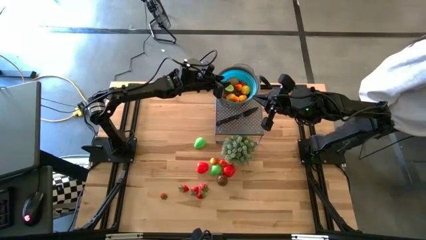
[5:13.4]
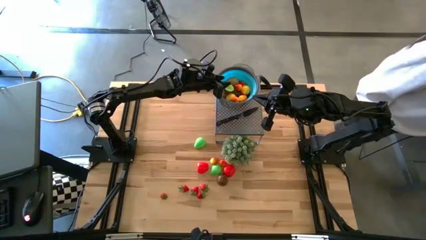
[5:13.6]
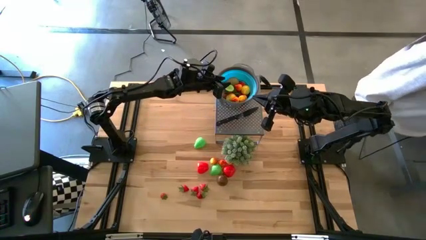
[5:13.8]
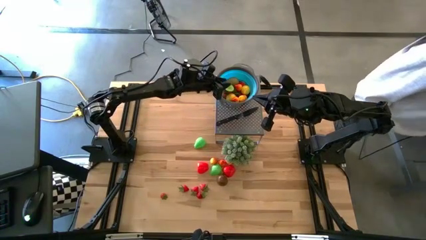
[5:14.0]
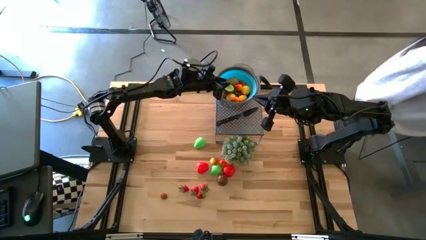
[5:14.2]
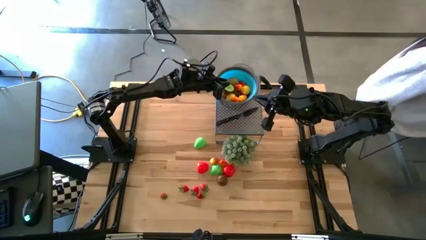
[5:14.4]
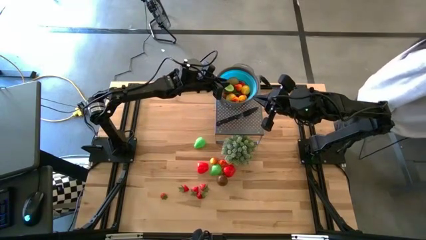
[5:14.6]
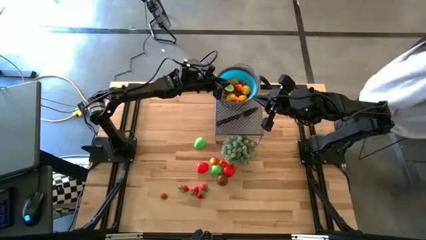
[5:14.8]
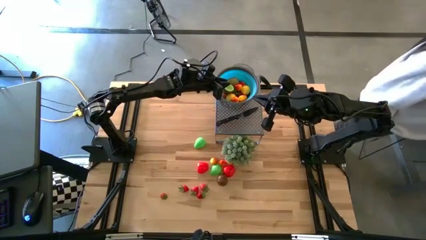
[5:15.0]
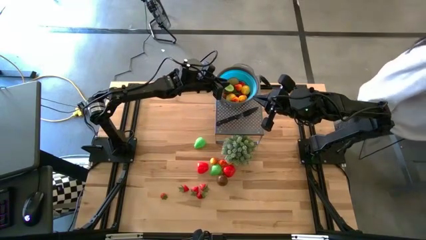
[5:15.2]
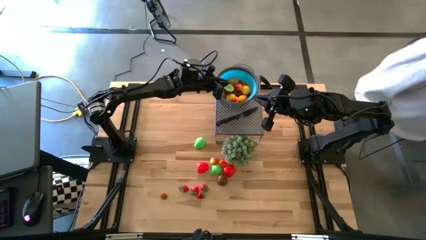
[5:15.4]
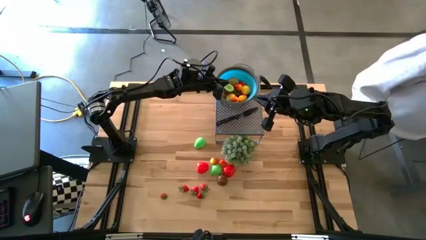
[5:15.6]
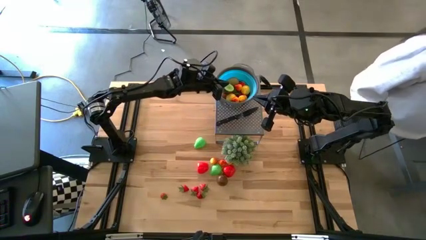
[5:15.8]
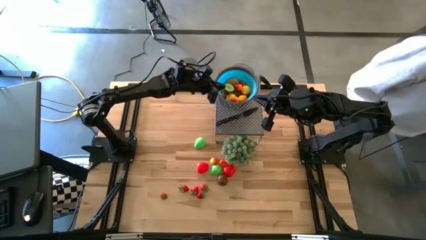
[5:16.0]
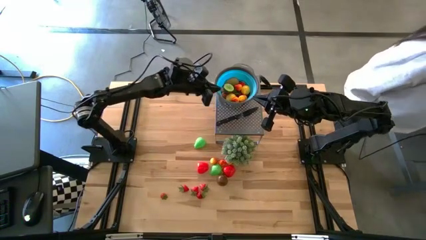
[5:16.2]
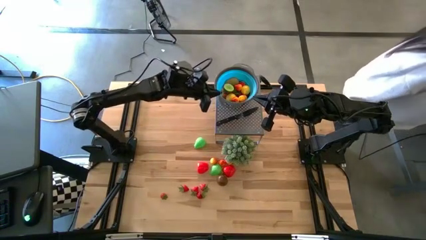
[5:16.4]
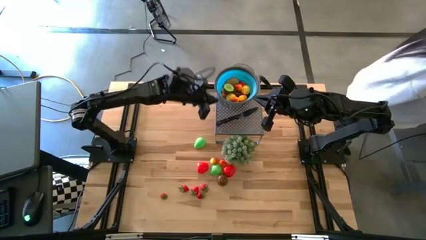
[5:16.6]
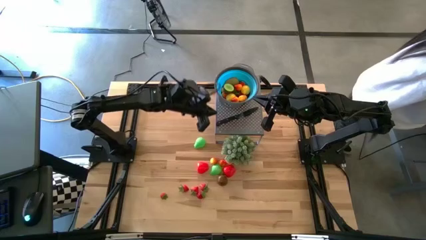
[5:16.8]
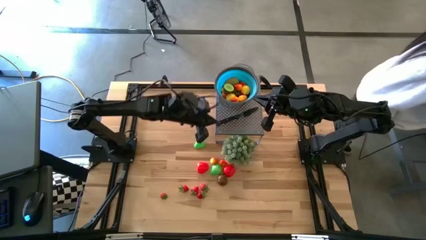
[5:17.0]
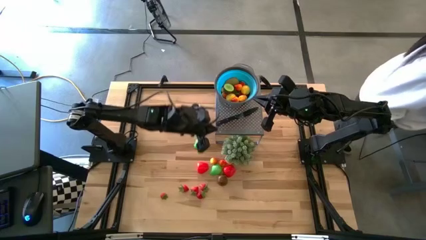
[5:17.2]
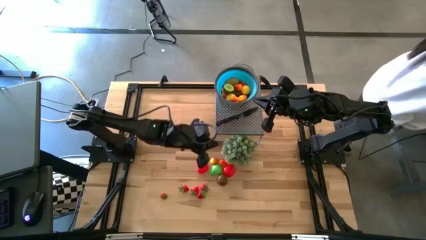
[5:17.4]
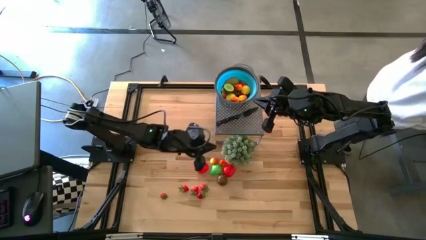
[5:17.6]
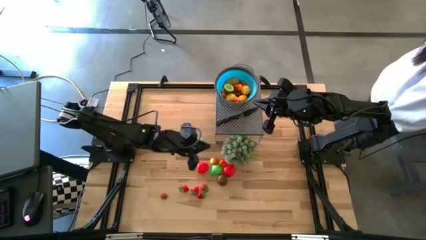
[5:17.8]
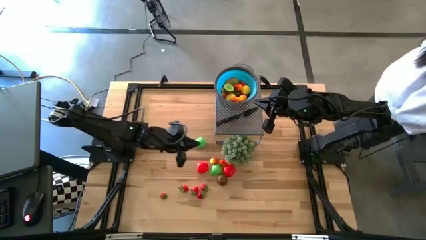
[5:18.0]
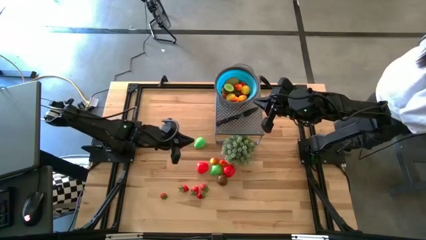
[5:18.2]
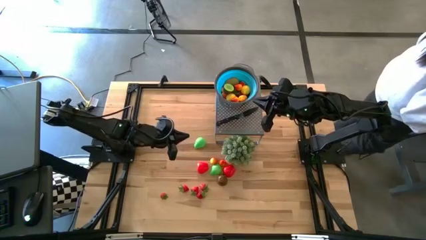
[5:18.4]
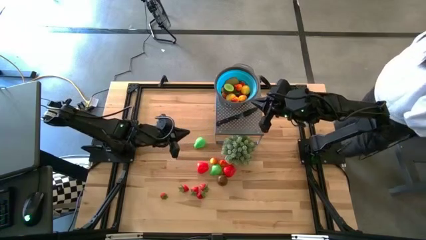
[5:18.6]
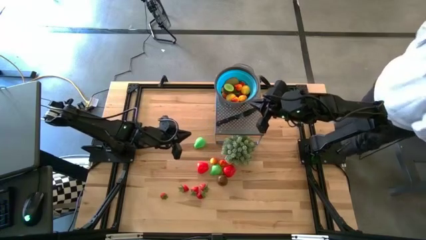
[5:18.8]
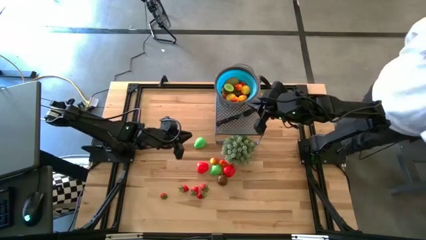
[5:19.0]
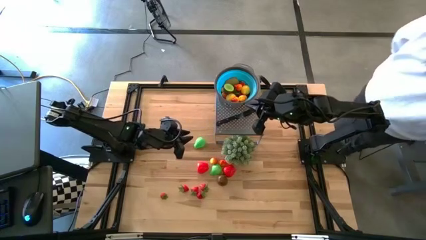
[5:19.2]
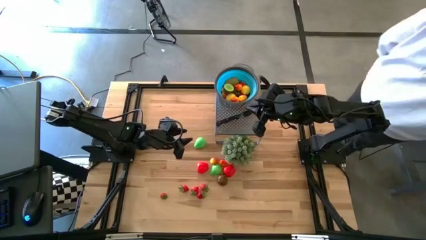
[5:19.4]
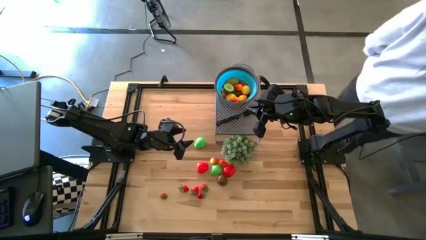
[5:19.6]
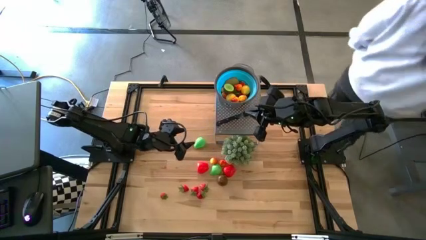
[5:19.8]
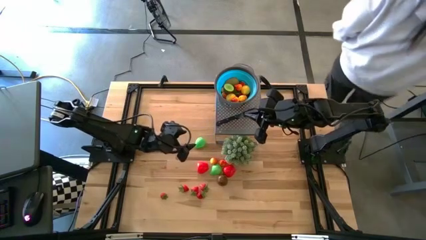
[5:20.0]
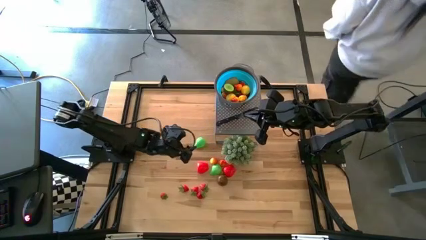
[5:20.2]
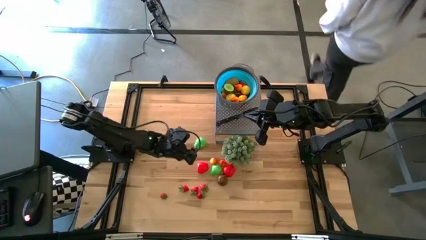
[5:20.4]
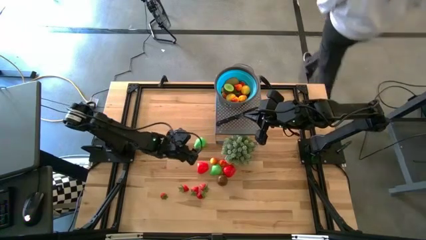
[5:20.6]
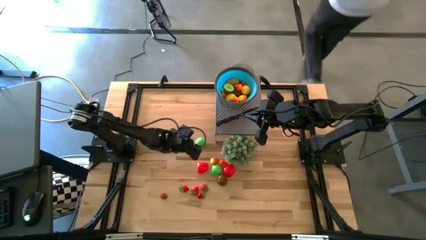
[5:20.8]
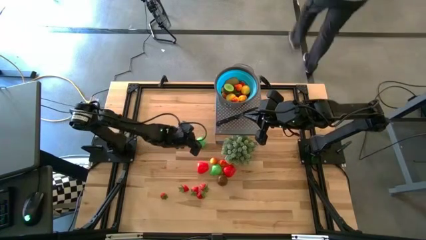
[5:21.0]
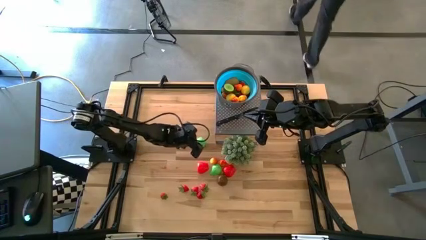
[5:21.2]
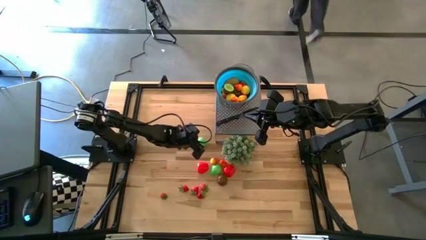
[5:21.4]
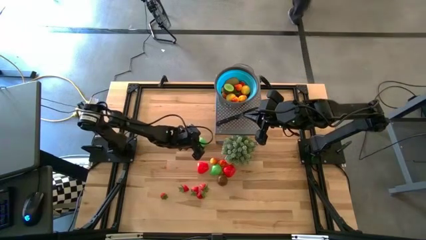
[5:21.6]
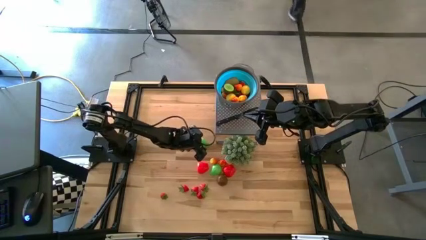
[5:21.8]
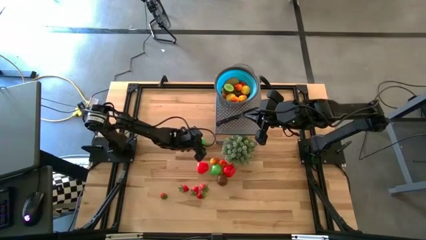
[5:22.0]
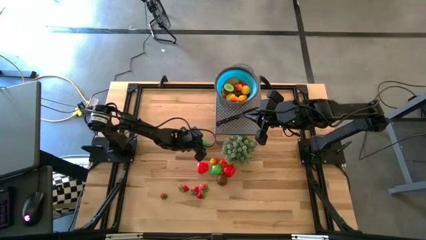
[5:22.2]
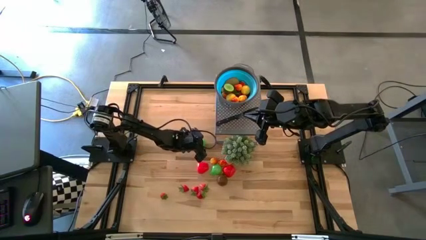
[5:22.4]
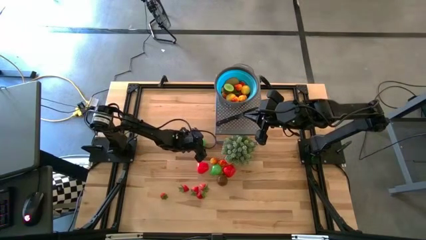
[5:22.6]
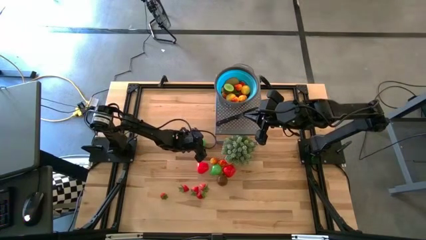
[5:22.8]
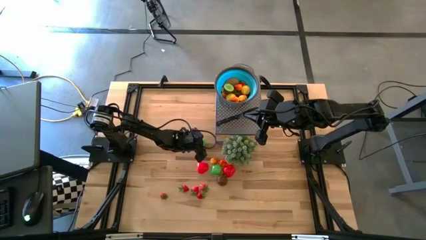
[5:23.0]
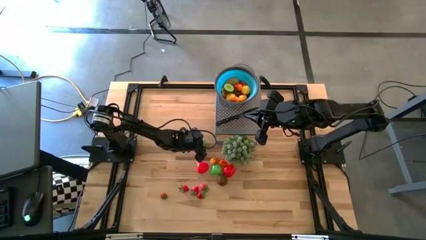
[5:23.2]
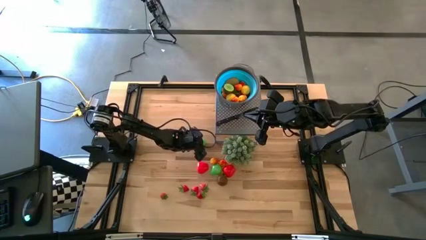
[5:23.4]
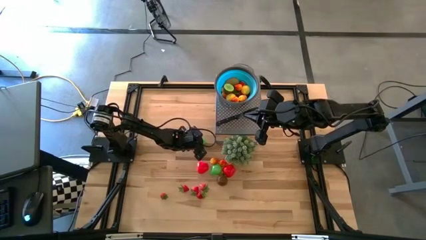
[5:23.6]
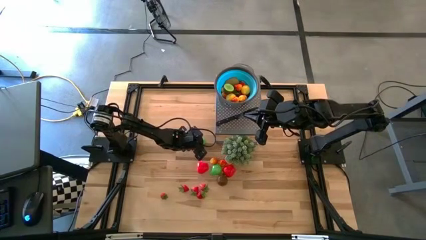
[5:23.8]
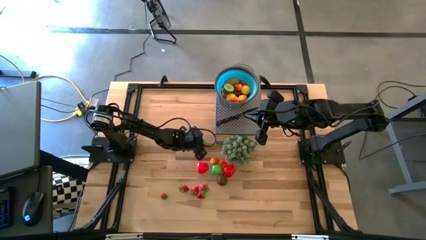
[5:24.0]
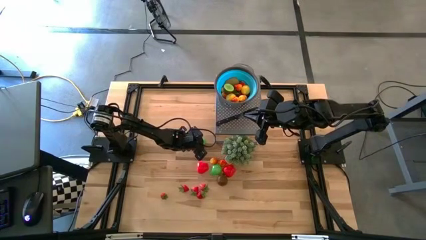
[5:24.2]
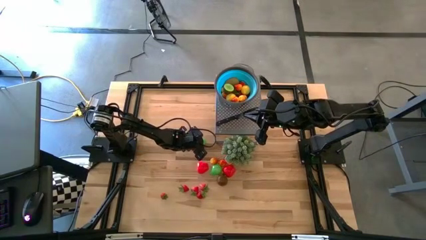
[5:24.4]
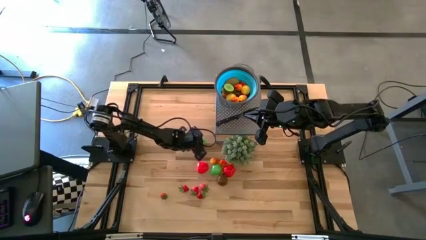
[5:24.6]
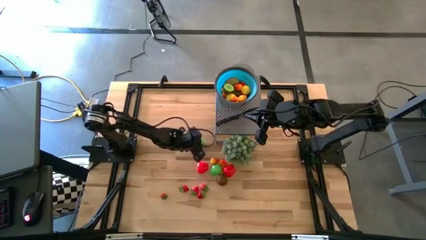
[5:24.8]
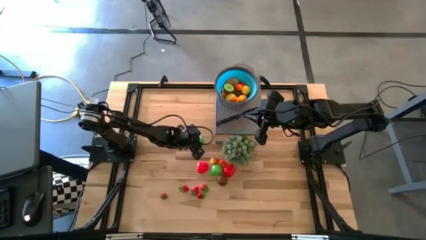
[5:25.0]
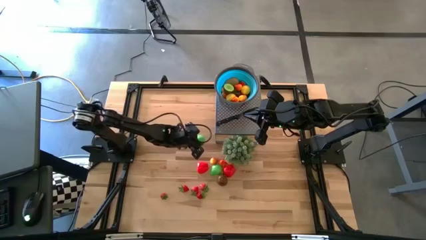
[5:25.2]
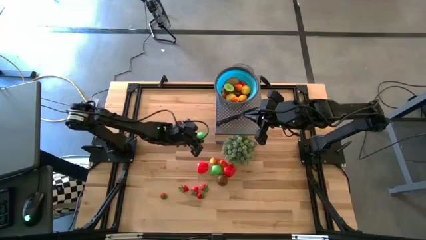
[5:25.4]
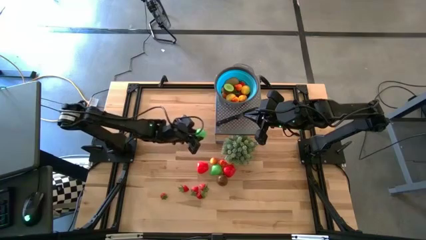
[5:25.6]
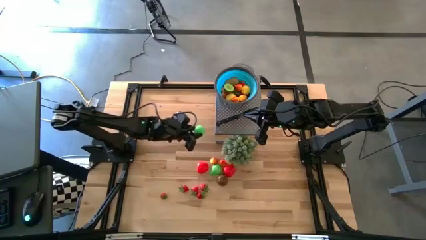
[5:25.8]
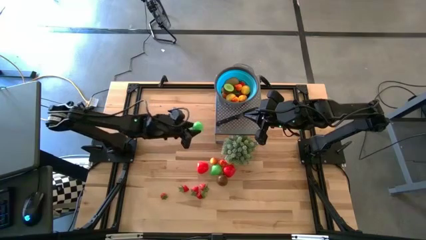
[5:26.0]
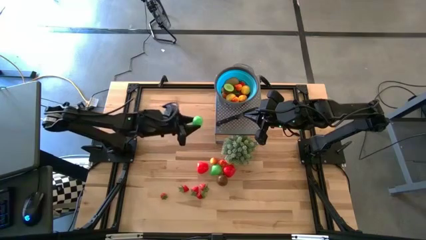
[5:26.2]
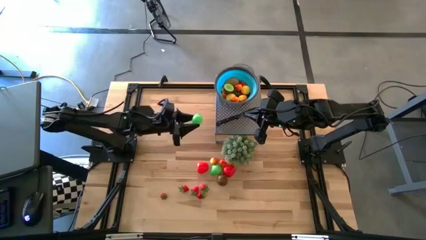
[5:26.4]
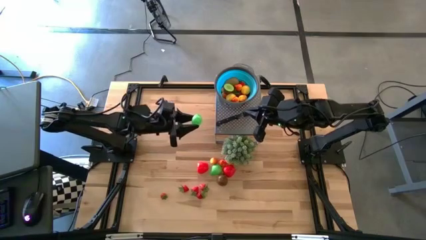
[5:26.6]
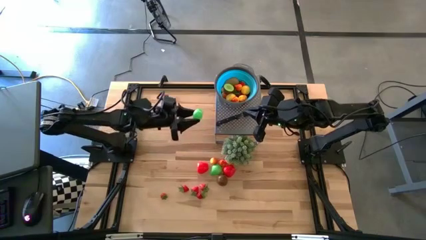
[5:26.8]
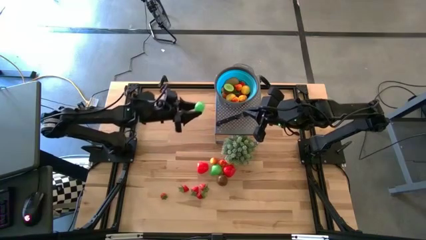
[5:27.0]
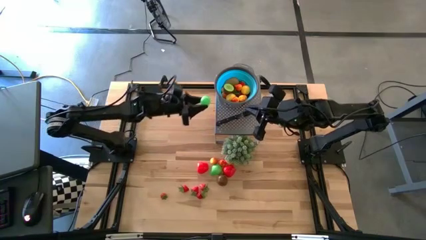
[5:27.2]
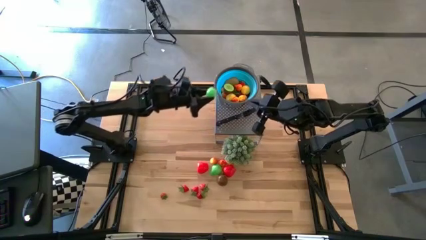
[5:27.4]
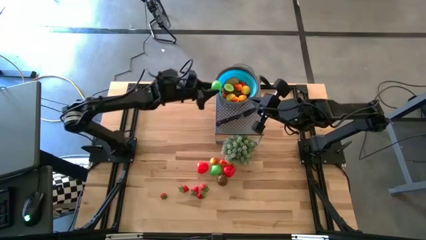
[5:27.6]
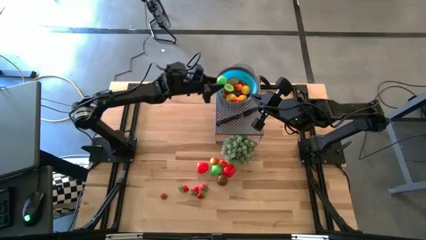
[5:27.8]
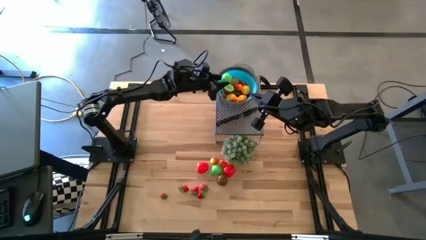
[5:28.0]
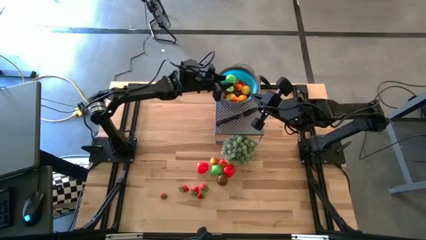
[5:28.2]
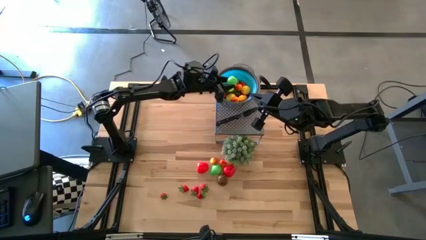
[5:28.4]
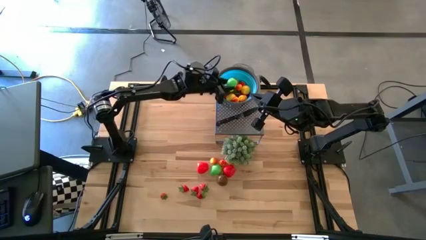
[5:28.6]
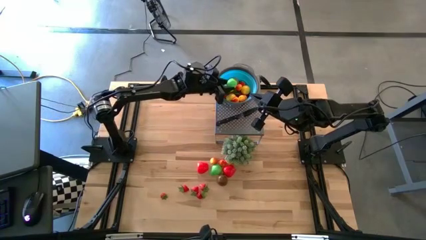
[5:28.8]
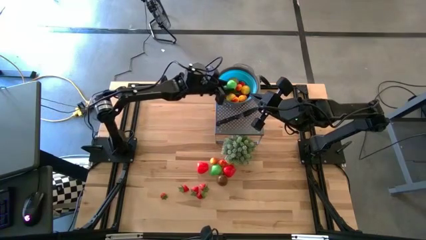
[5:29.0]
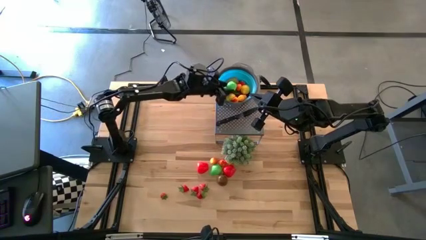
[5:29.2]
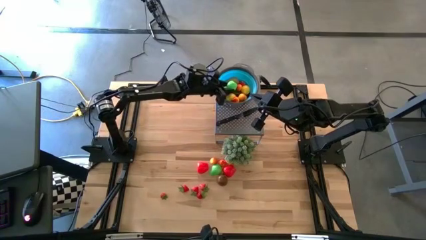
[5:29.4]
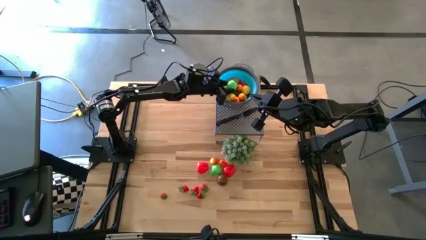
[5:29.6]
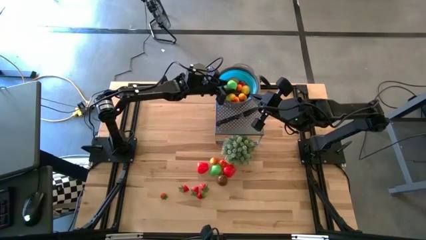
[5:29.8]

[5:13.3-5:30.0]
Task: Pick & Place Fruit
Put the green pear into the blue strainer bowl

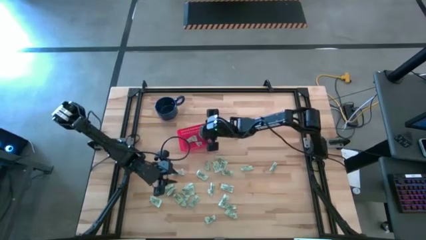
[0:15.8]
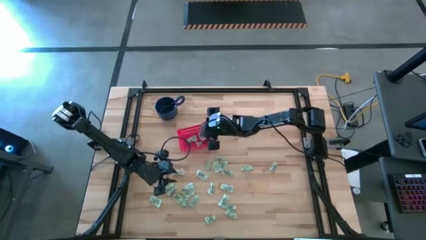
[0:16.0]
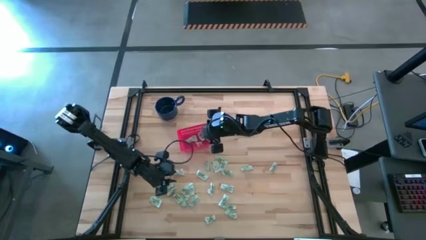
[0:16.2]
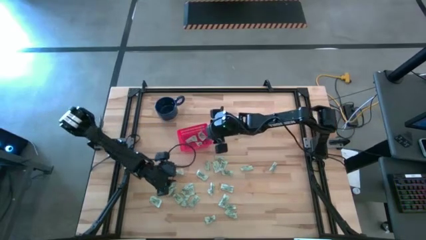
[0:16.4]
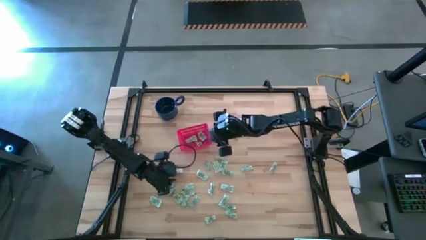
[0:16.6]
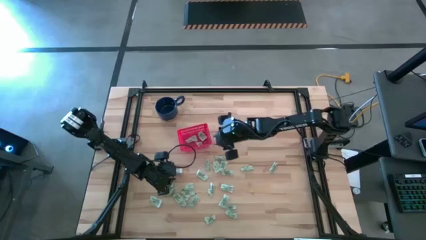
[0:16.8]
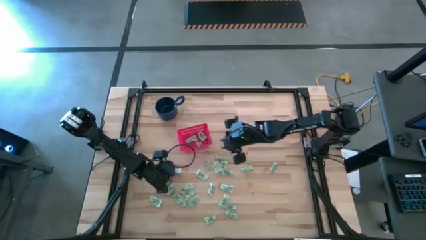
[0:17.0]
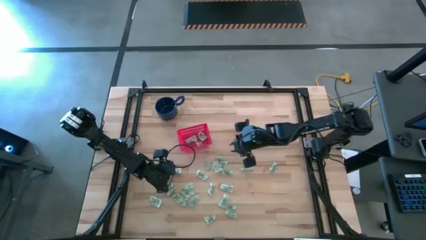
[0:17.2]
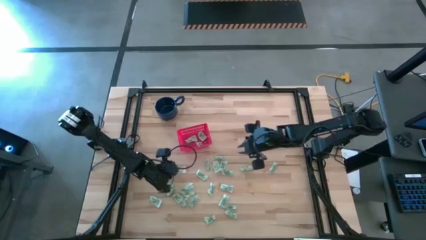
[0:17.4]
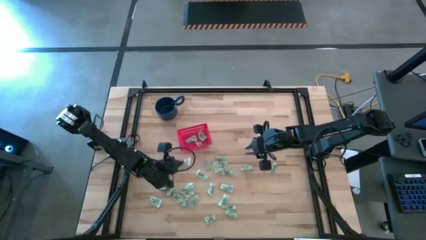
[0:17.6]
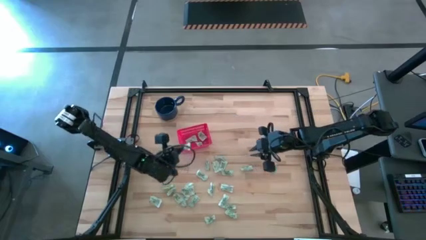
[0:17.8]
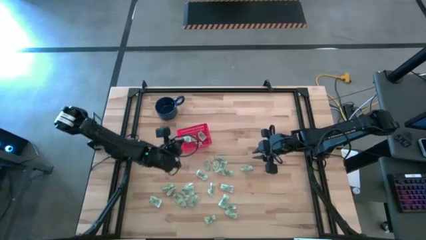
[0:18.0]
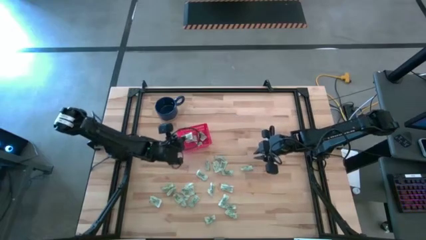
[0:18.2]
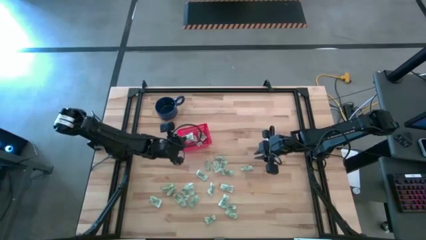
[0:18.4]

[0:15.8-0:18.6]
Task: Pick and place items into bin
Put the green stevia packet into the red bin
